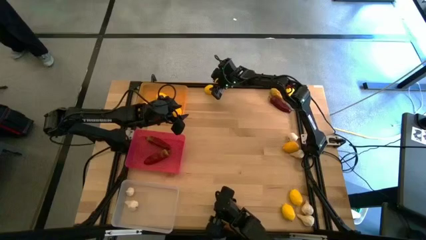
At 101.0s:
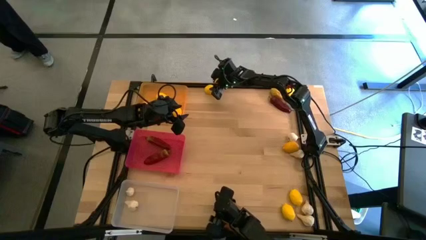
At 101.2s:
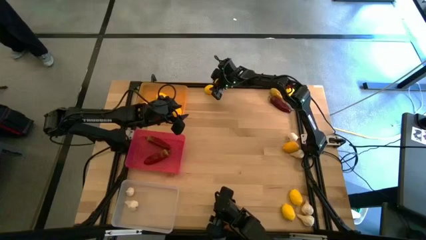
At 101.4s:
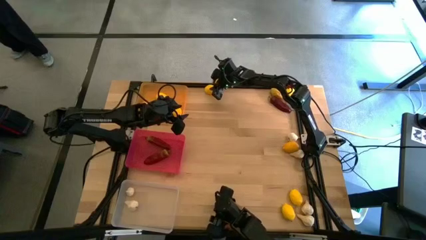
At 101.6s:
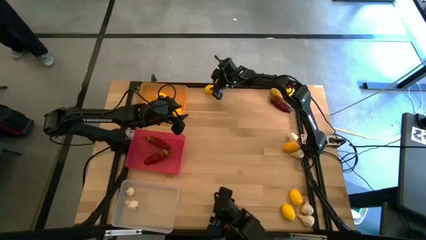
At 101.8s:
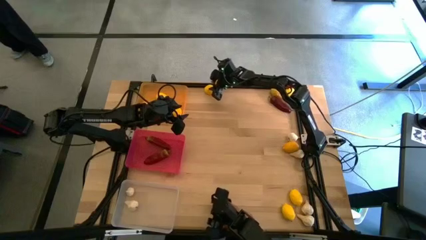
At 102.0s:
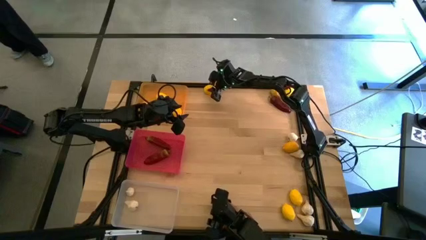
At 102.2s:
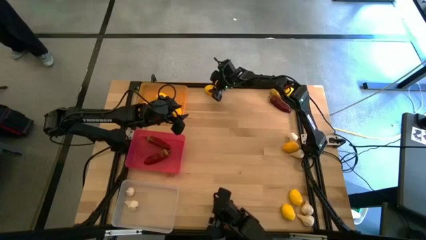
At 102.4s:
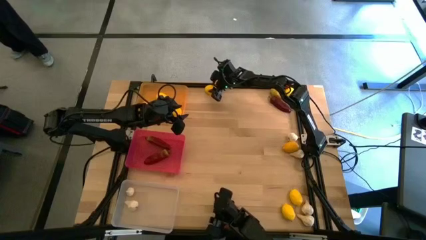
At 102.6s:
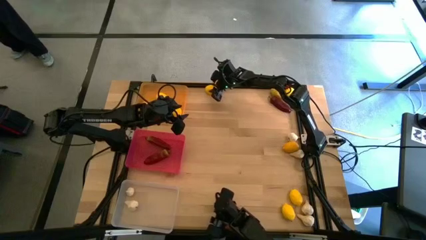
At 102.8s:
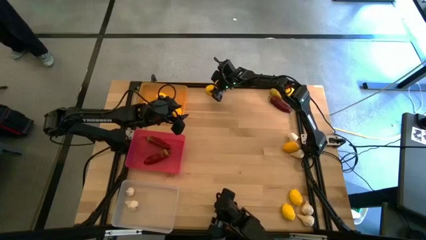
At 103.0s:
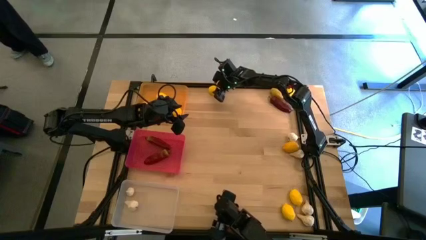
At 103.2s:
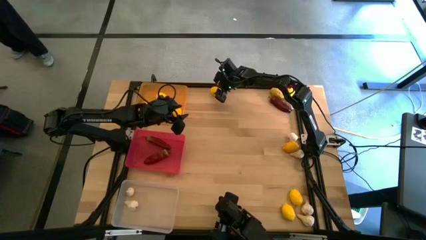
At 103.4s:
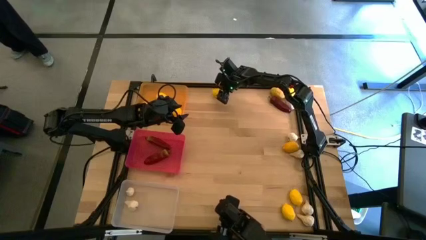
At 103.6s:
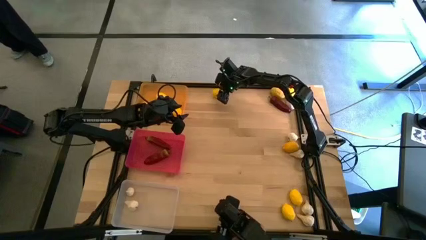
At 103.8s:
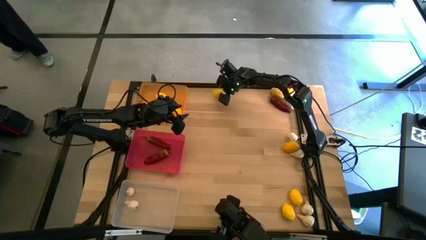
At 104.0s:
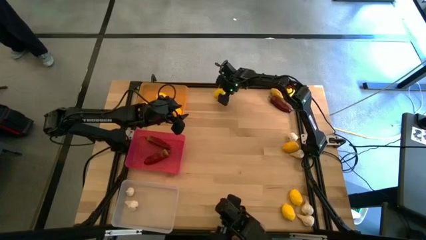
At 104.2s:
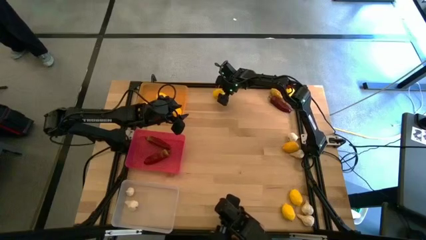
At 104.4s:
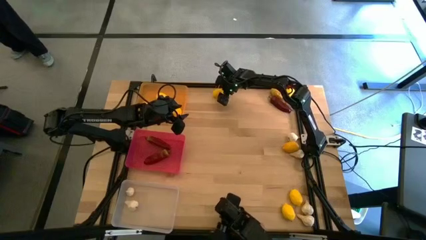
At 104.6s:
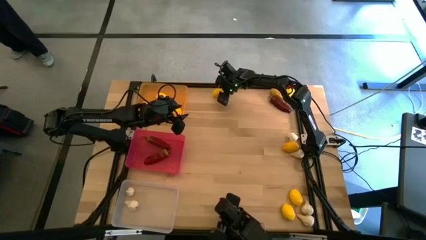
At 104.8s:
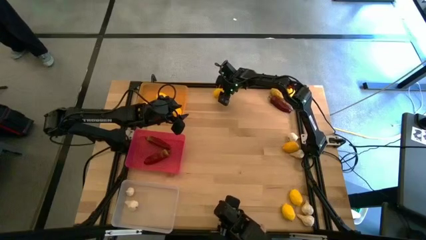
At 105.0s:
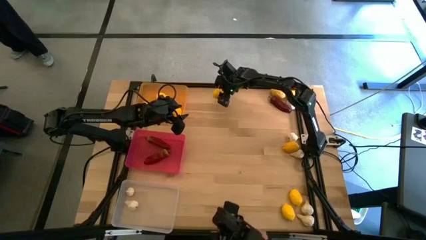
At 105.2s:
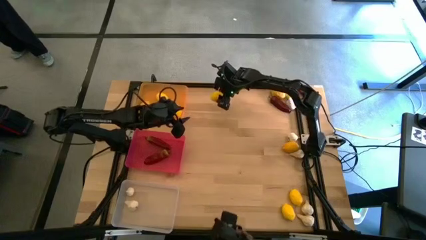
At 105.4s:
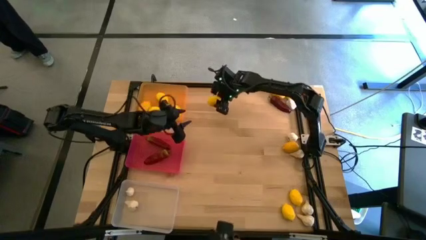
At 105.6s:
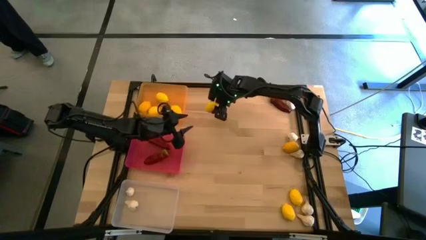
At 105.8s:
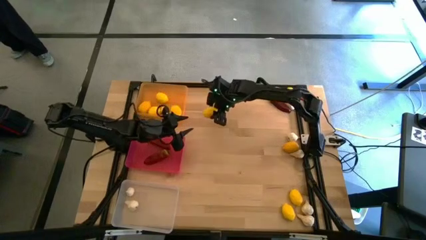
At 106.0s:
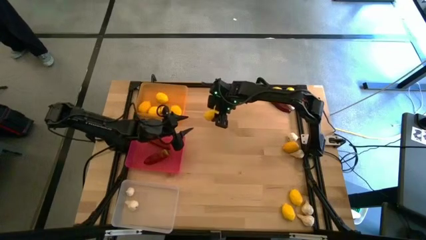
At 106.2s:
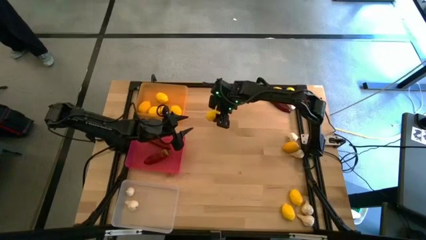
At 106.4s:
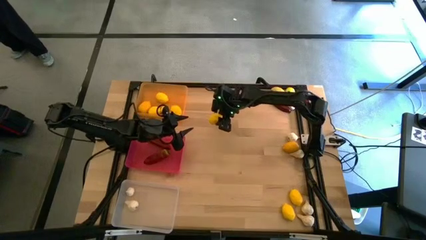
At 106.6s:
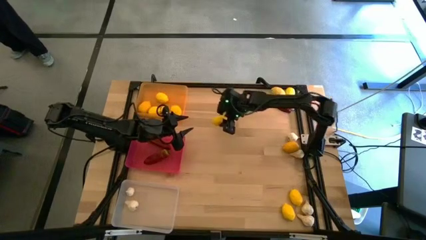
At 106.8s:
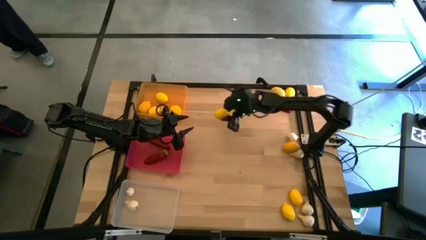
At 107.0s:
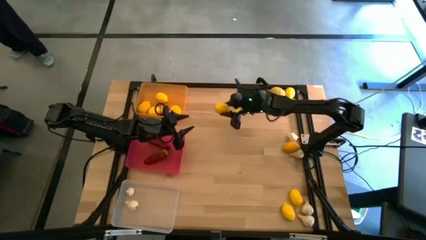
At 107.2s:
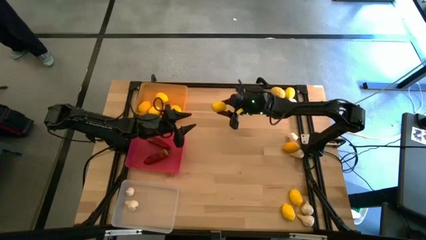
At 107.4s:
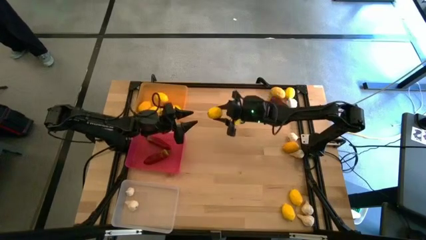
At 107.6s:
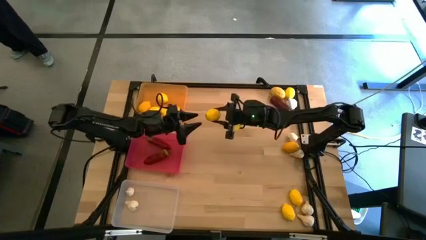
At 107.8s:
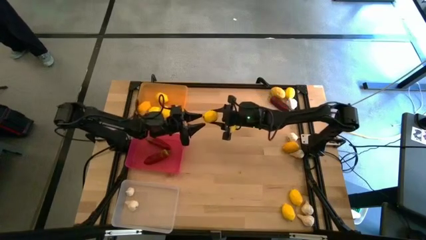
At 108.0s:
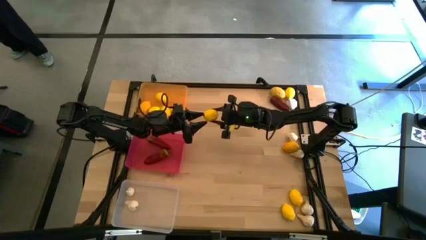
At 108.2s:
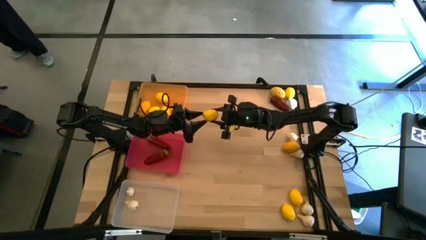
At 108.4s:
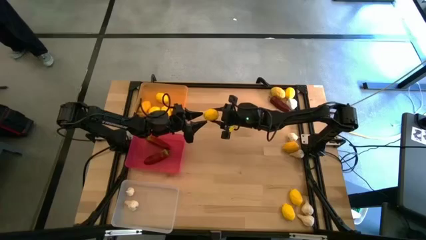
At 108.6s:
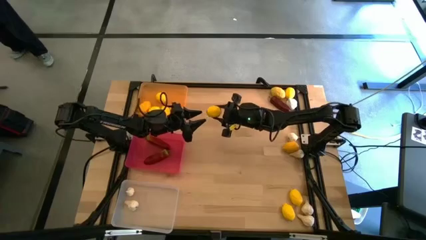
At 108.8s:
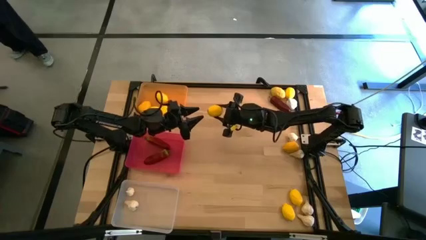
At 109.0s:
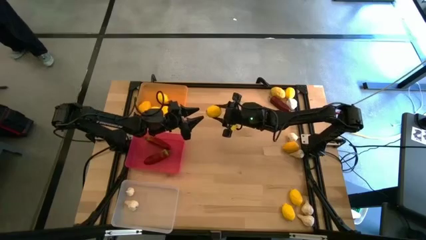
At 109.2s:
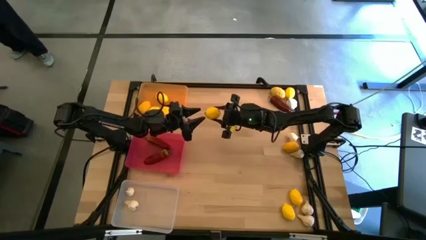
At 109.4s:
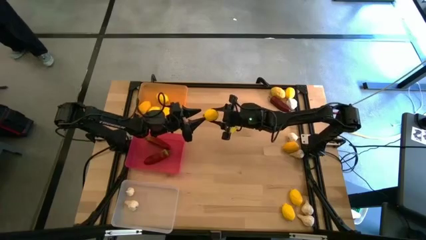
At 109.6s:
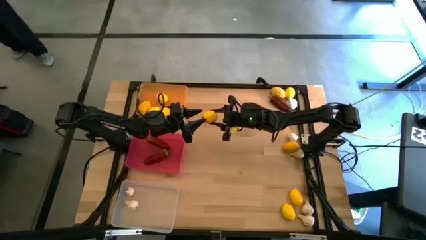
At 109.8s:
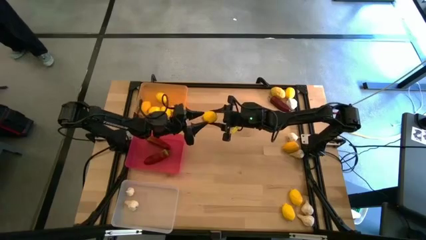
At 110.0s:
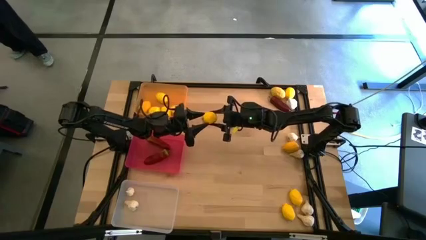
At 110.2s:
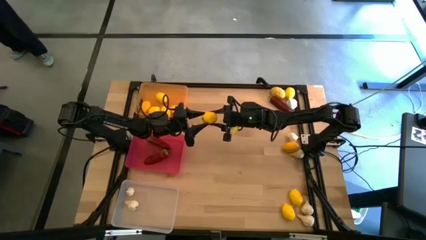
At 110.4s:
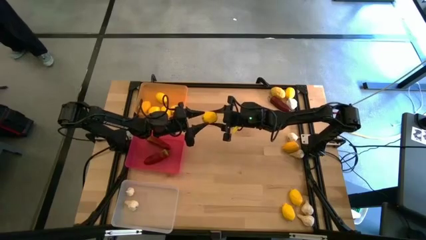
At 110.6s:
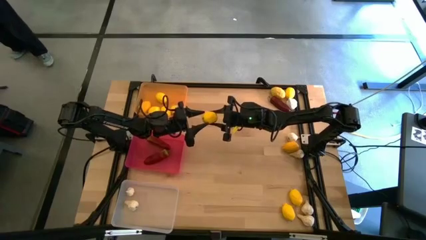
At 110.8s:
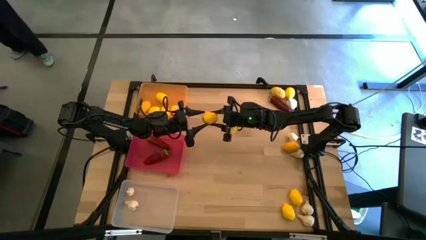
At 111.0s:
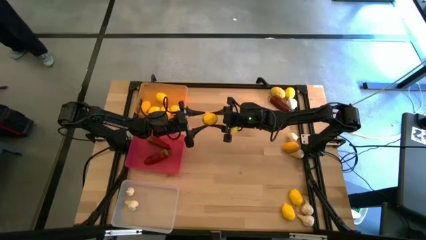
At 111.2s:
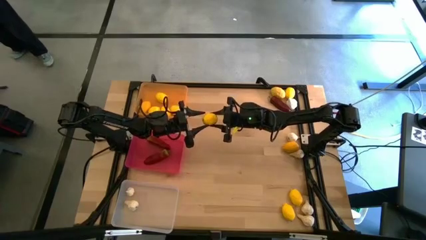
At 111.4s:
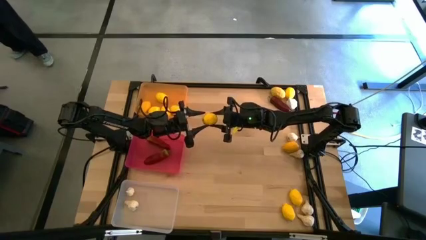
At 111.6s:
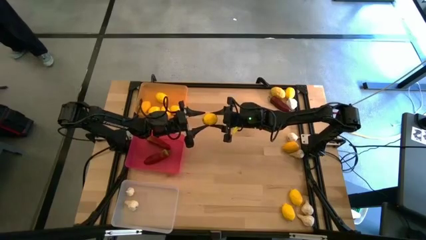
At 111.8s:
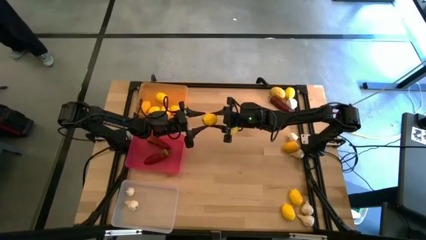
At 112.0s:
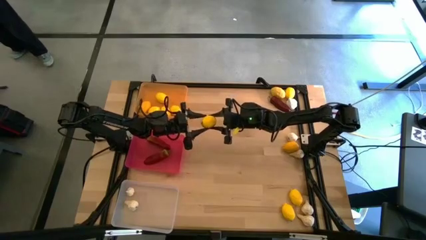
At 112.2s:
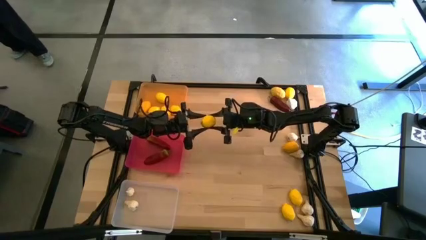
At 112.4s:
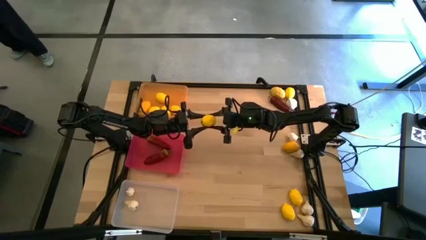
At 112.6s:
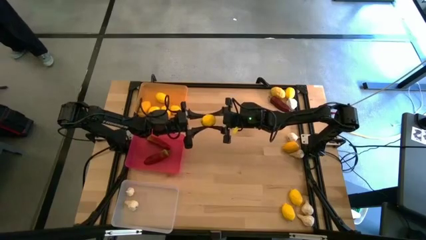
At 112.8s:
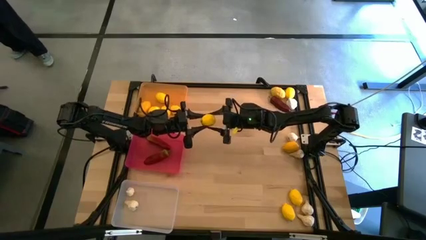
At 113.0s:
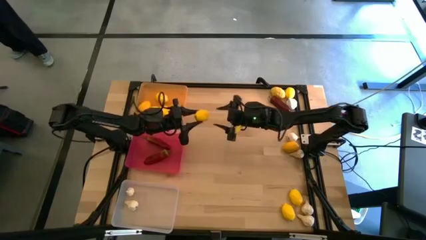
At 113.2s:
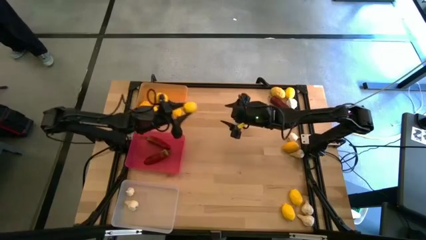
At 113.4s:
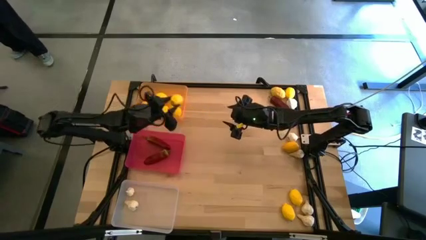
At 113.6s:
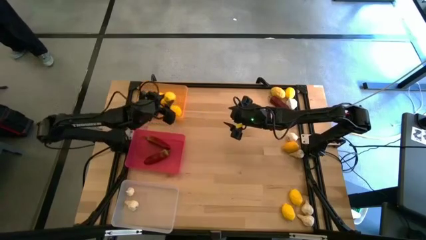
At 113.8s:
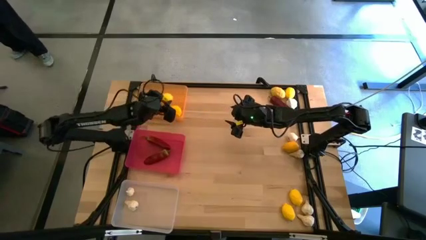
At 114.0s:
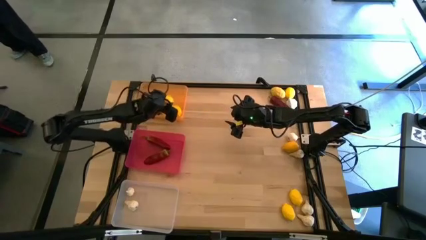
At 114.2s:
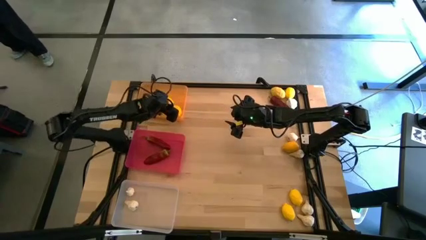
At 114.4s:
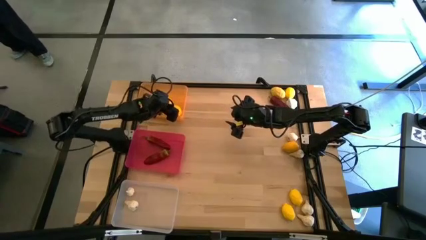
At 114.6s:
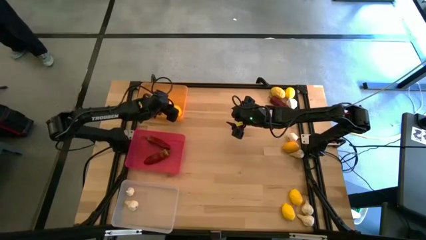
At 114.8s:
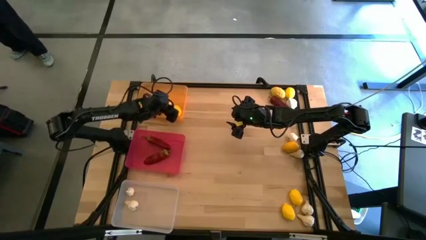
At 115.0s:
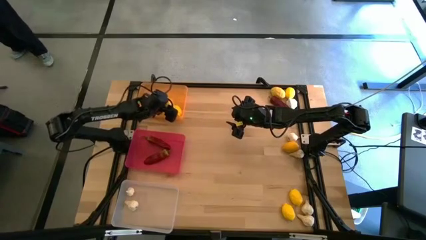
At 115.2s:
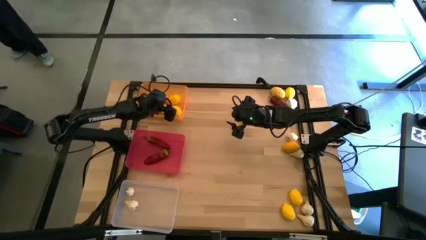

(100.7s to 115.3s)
Task: Sort produce into baskets
Put the lemon into the yellow bin

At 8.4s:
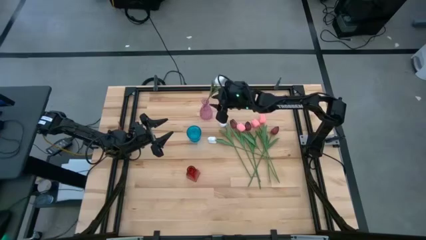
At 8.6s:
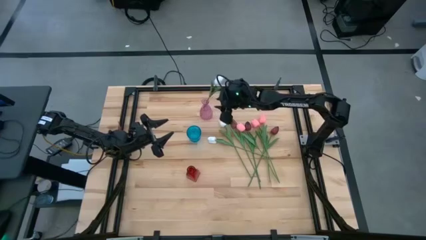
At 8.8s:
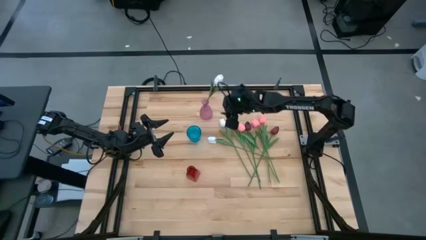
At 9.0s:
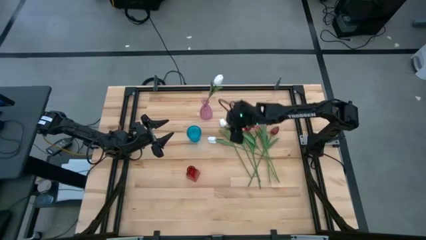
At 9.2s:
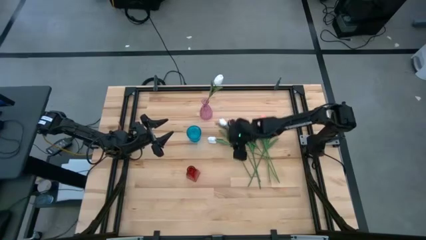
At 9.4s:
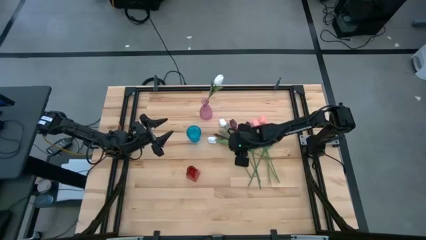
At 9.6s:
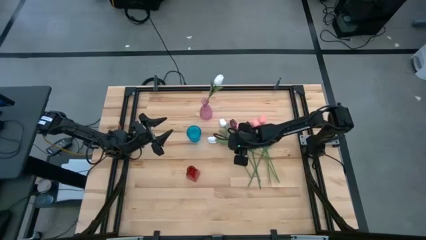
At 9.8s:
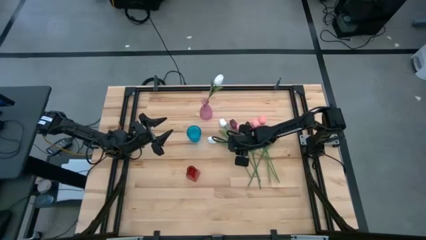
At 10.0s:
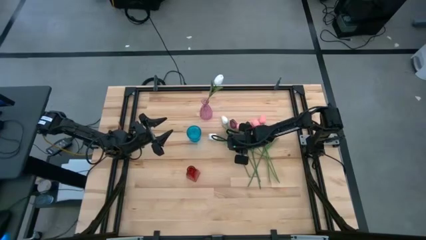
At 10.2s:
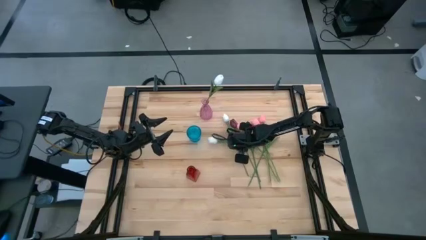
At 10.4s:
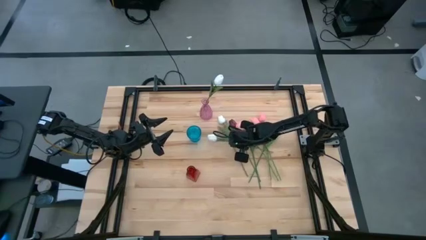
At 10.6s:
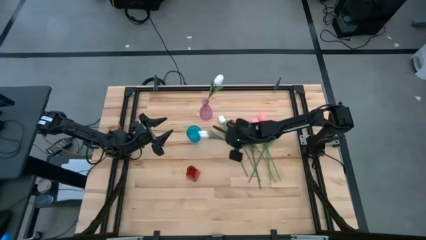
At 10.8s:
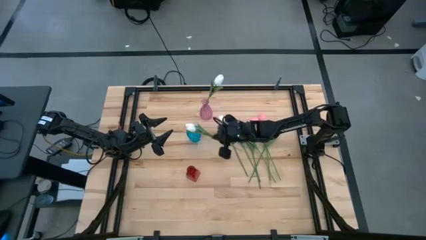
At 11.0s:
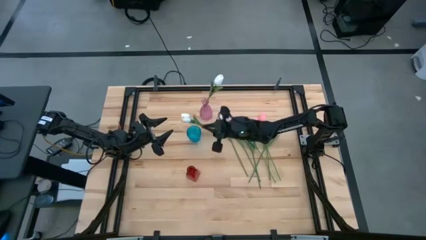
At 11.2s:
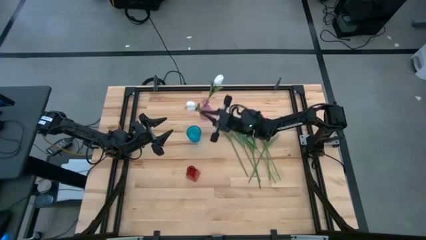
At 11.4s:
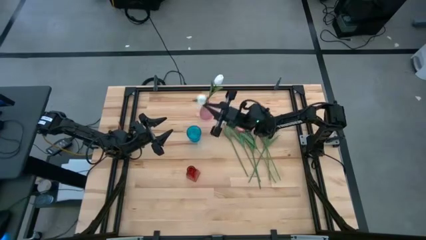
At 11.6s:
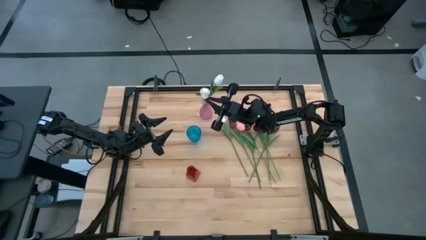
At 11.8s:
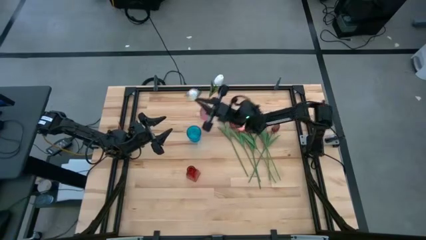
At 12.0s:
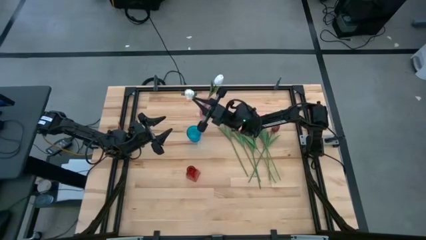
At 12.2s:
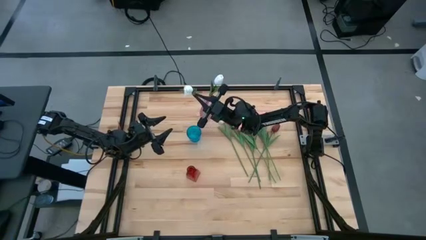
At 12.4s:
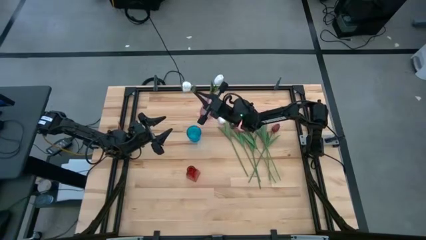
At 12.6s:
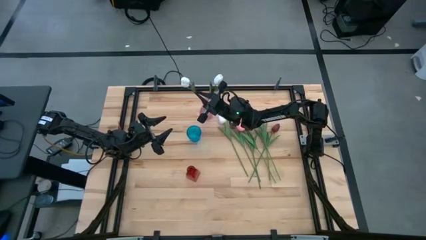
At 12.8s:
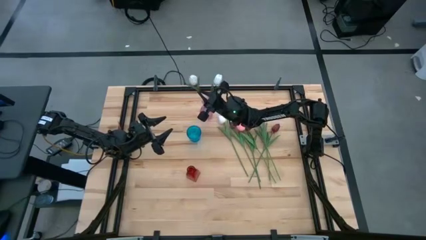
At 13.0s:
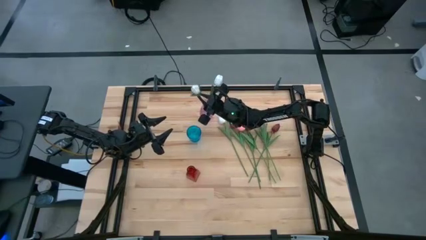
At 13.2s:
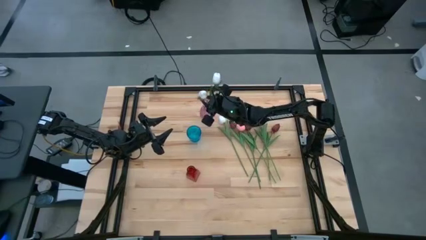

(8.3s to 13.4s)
Task: Sort flowers into vase by color
Put the bottom white flower into the violet vase
